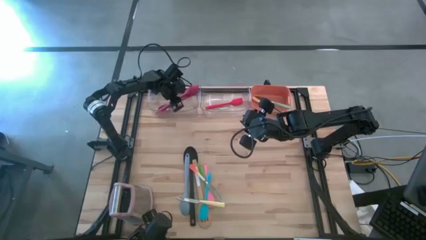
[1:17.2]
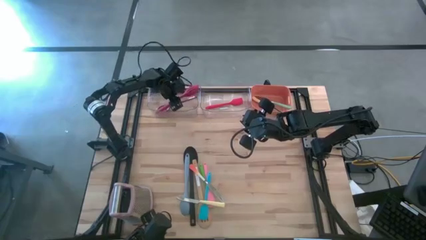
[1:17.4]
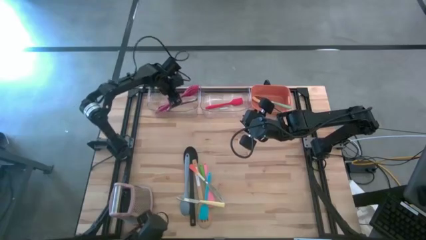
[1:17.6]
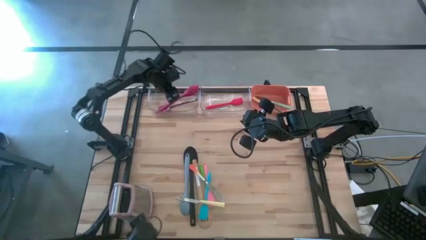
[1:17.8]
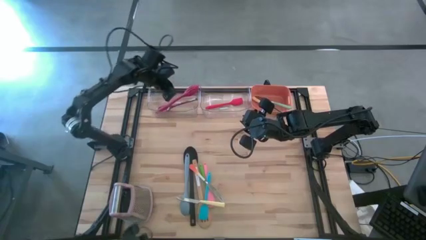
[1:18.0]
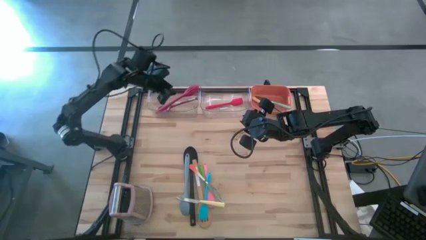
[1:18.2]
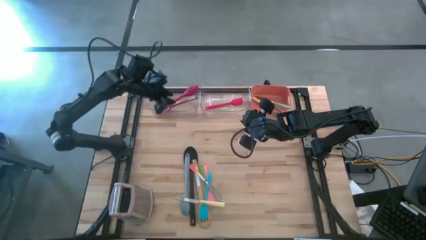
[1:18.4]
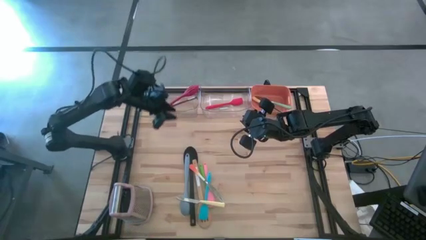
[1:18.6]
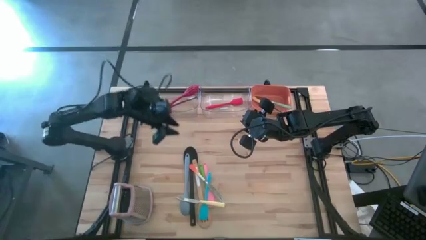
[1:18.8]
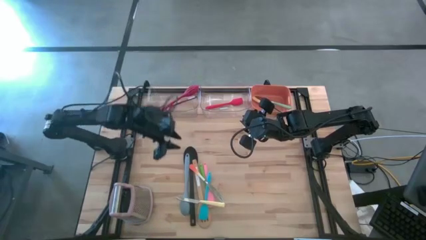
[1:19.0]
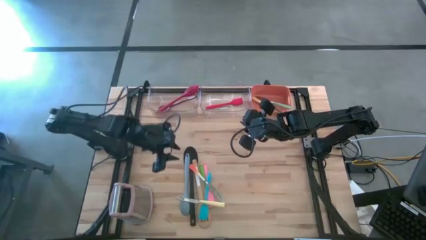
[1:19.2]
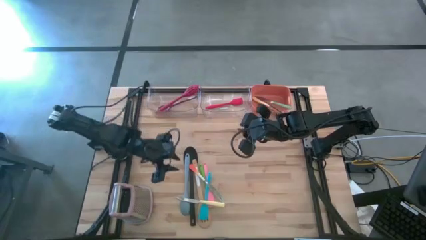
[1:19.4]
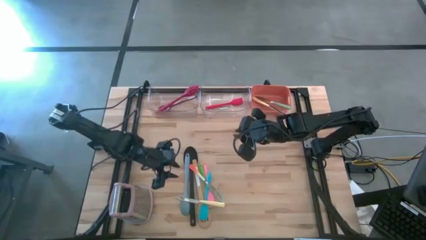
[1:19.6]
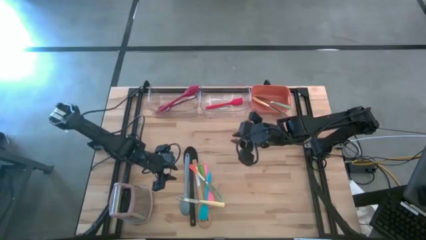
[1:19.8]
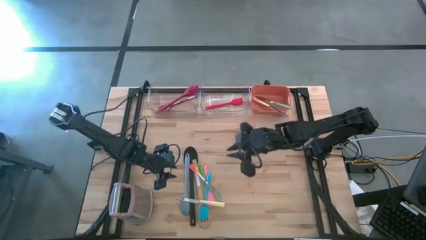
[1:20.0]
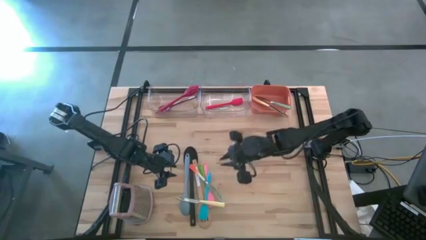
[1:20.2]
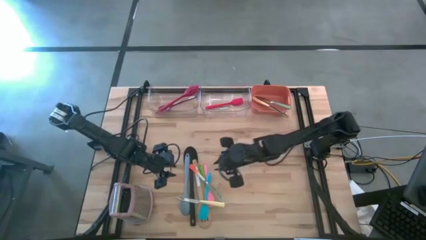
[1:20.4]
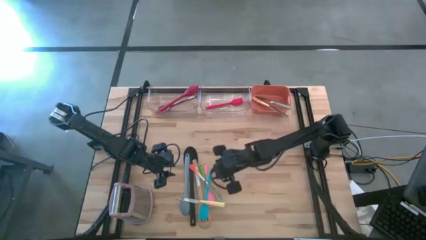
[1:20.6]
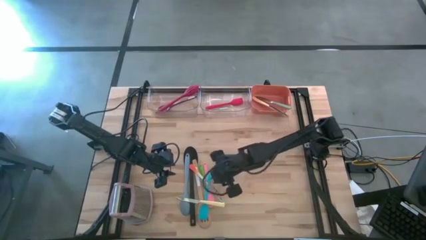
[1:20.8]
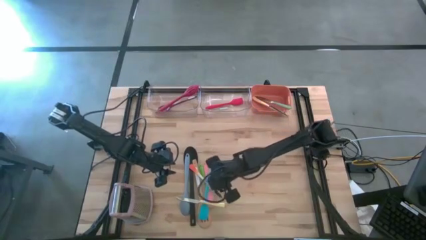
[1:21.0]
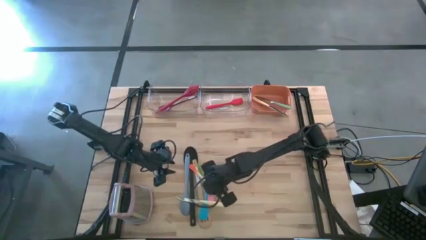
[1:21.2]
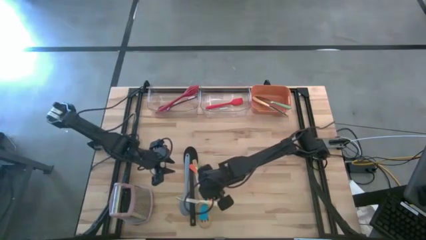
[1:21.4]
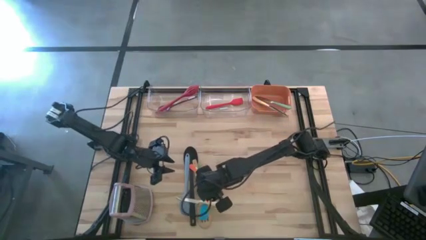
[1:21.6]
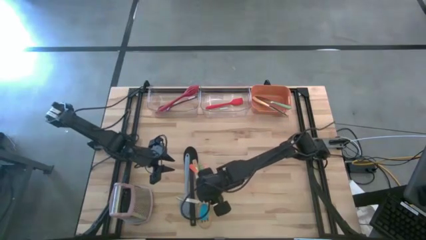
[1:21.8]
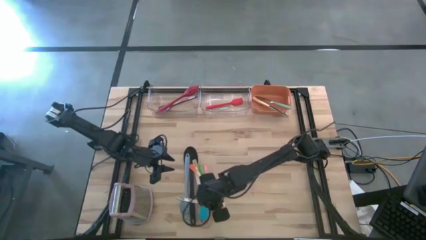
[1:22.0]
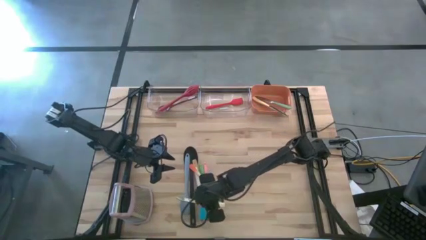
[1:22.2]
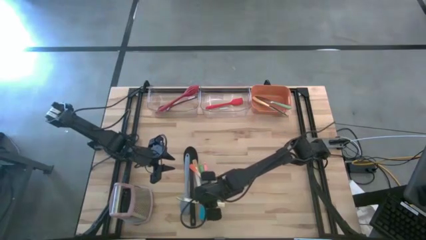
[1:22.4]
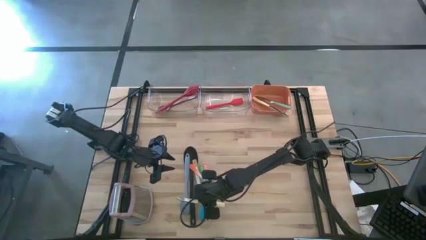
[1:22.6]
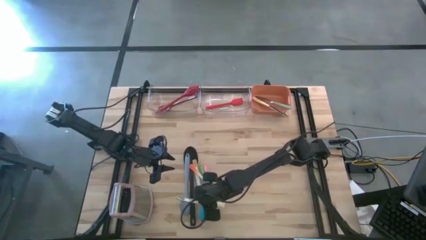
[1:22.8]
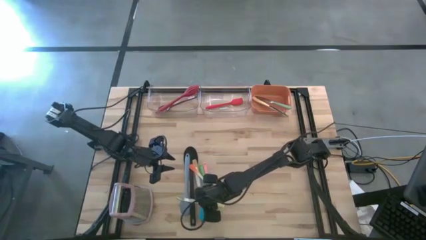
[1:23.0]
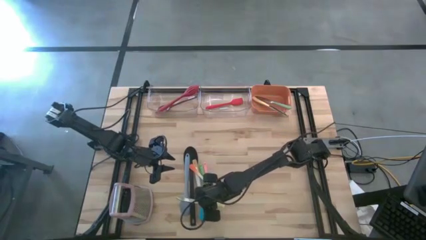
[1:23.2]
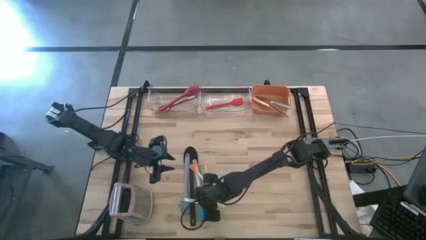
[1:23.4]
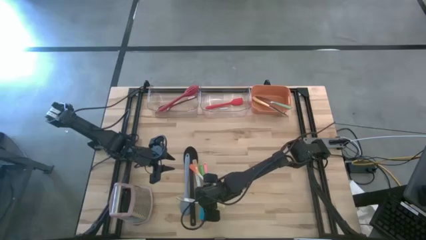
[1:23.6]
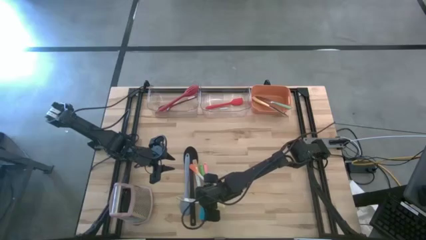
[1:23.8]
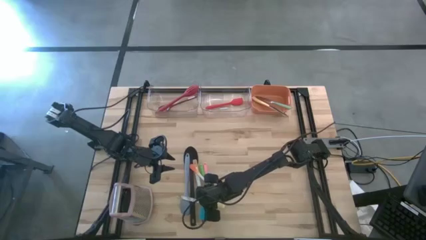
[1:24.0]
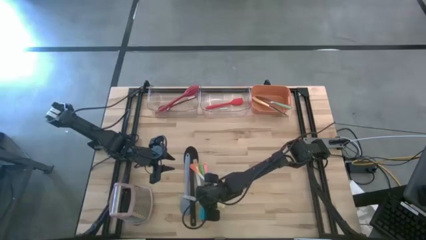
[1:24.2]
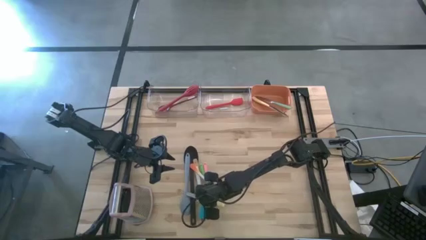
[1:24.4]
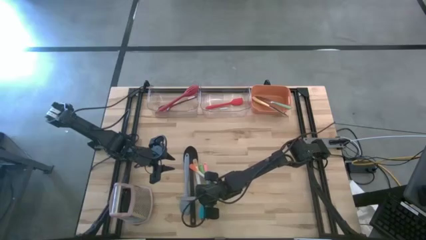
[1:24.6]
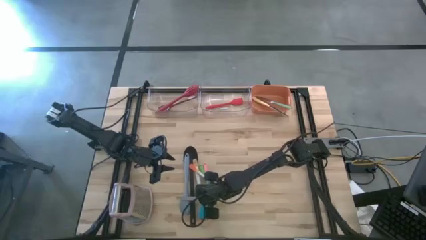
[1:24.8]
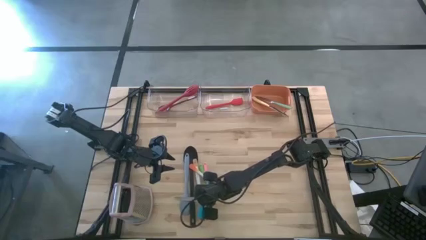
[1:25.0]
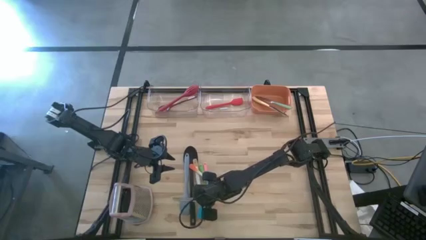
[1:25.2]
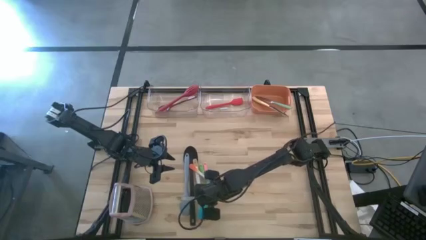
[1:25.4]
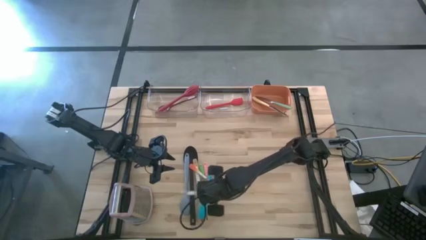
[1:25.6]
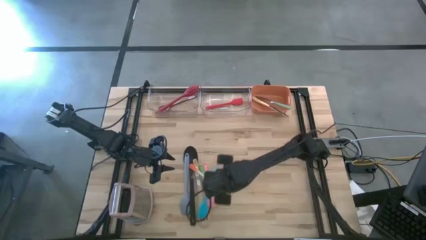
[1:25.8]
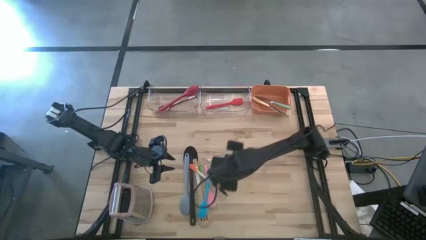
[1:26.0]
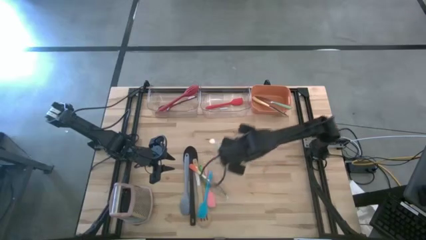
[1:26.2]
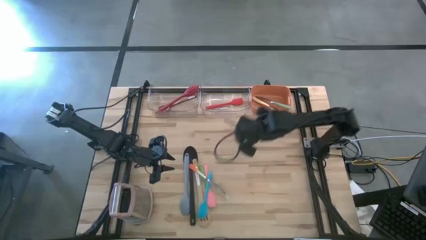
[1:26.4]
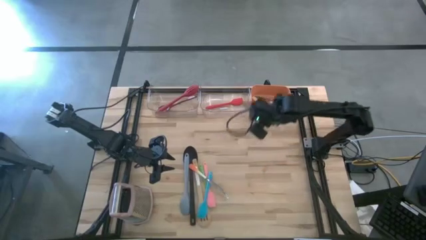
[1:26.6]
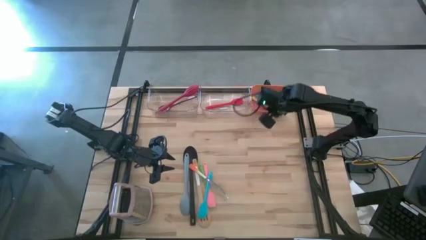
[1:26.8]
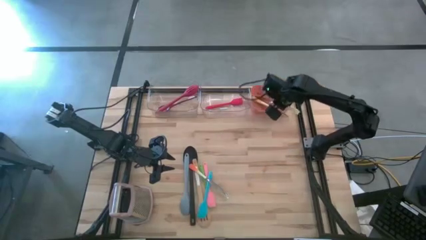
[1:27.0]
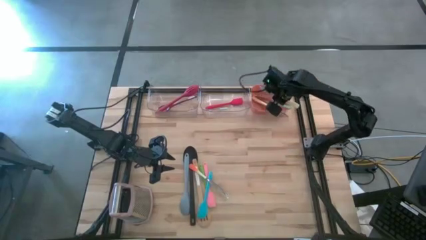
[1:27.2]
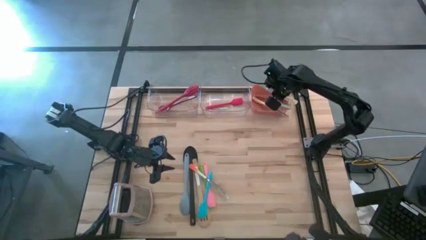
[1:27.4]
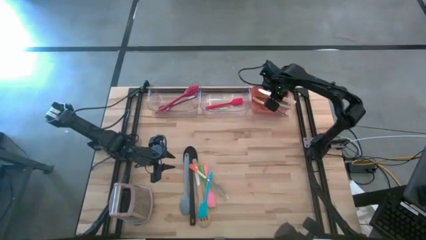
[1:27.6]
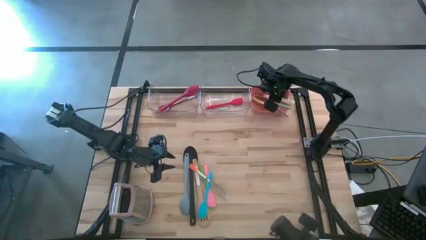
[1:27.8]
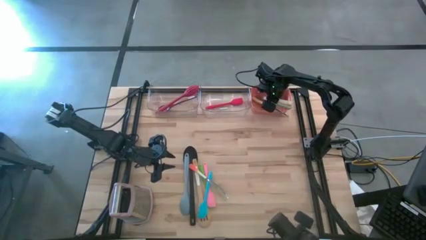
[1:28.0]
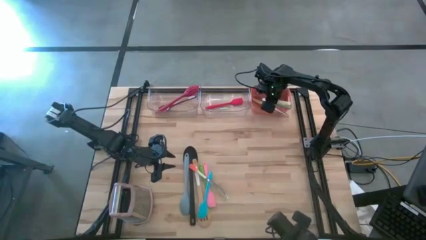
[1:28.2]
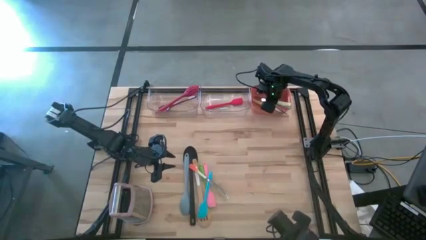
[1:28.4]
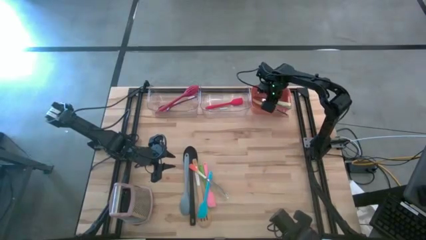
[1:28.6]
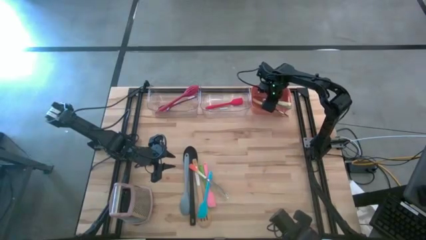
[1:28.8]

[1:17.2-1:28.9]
Task: Pick & Place Kitchen Items
Put the white knife into the orange bin
